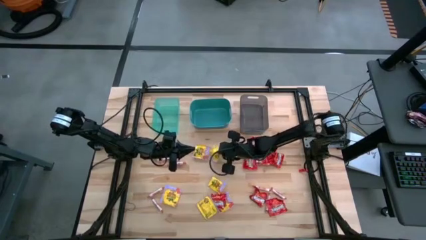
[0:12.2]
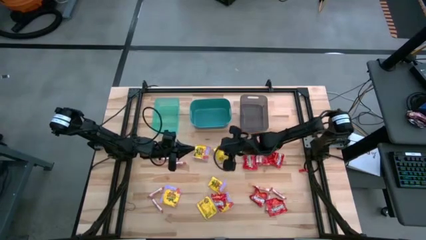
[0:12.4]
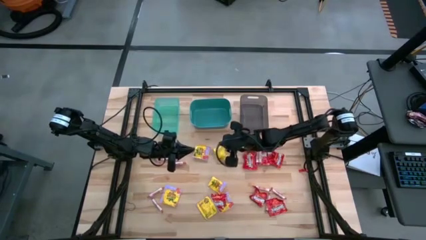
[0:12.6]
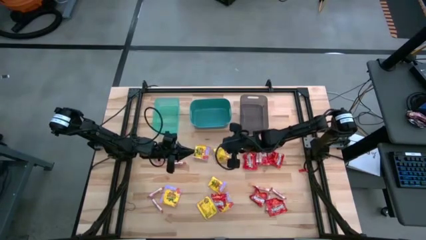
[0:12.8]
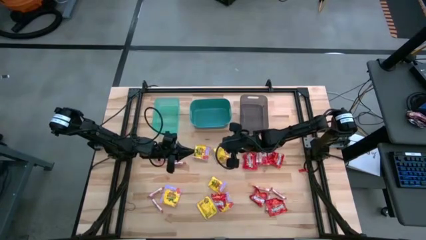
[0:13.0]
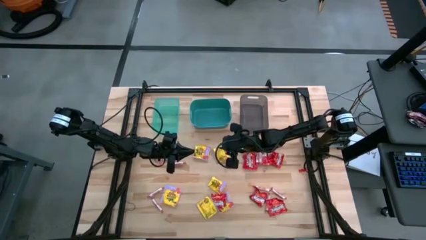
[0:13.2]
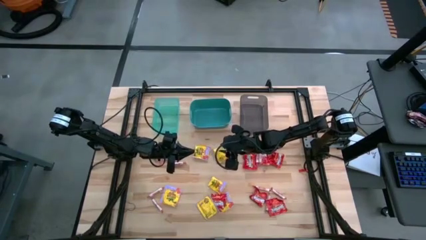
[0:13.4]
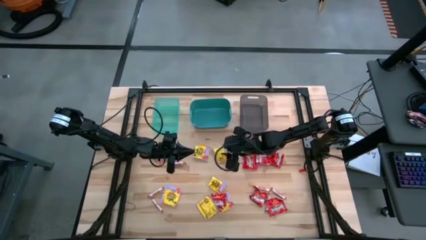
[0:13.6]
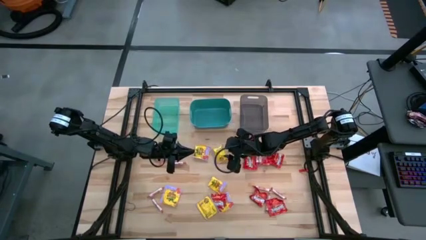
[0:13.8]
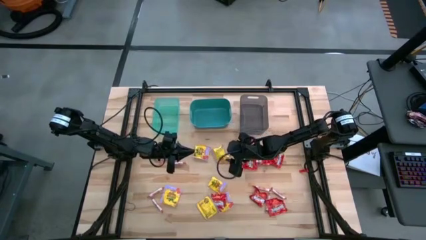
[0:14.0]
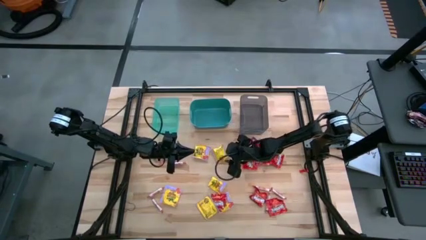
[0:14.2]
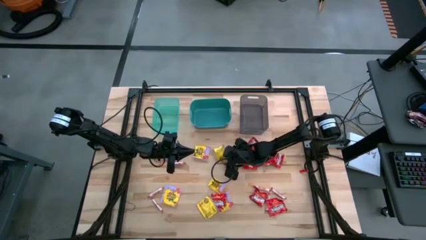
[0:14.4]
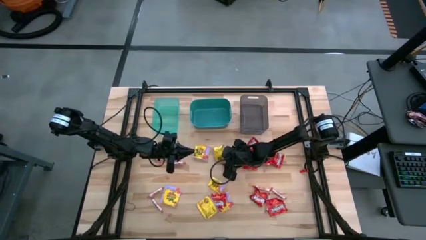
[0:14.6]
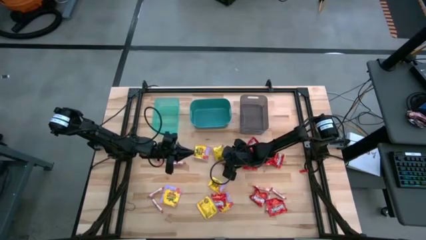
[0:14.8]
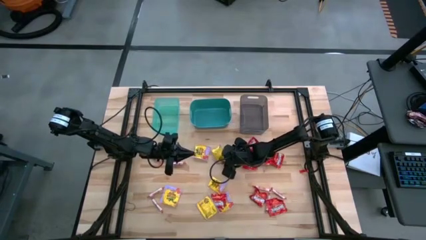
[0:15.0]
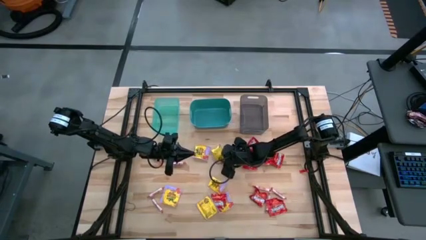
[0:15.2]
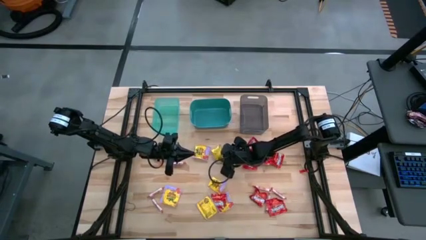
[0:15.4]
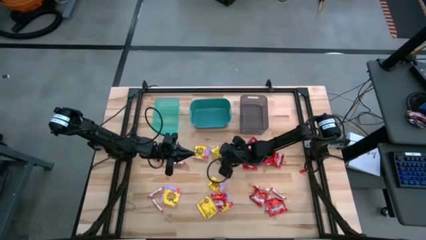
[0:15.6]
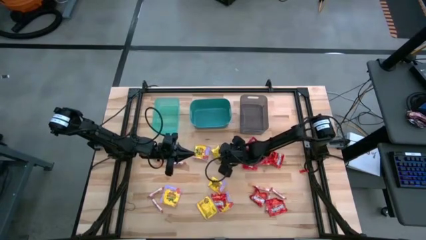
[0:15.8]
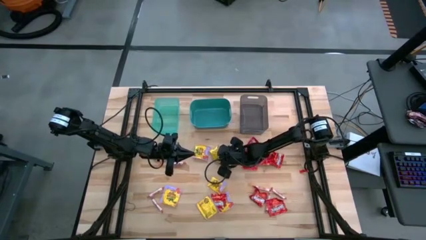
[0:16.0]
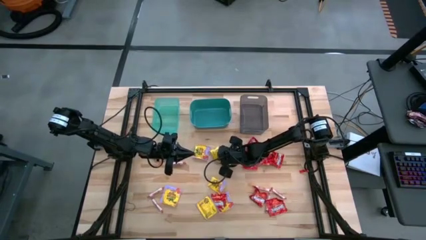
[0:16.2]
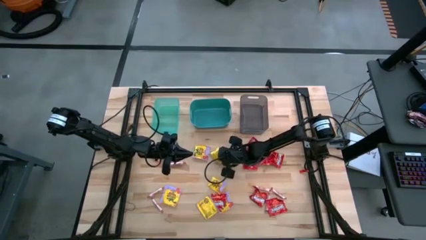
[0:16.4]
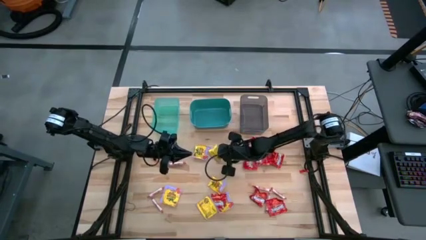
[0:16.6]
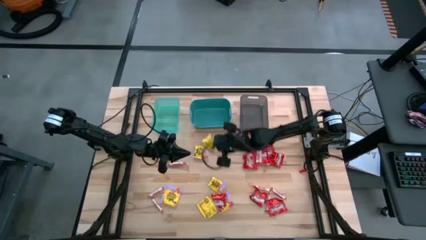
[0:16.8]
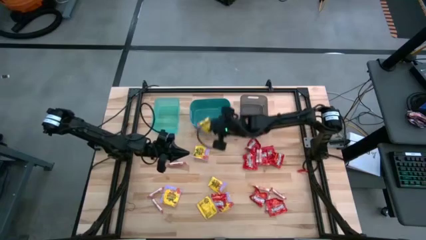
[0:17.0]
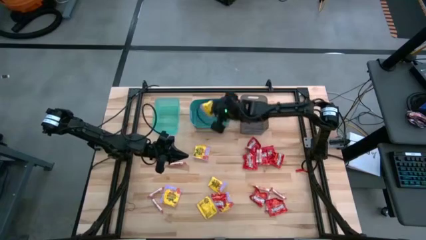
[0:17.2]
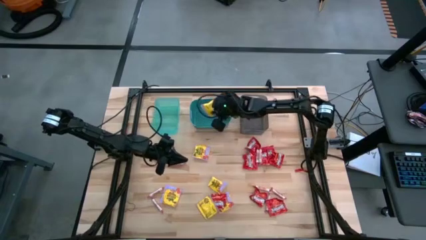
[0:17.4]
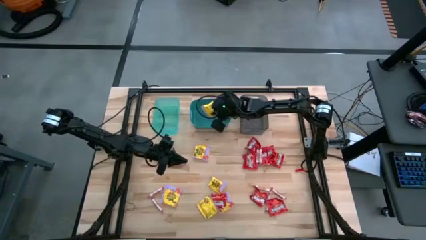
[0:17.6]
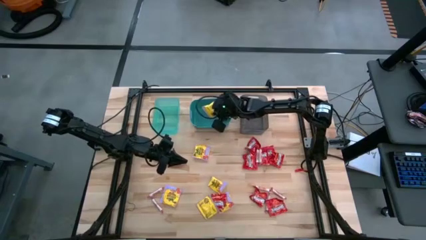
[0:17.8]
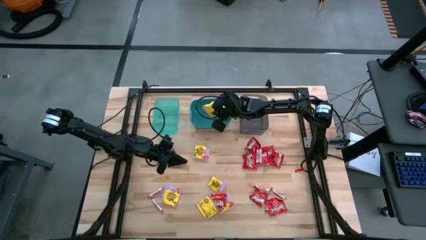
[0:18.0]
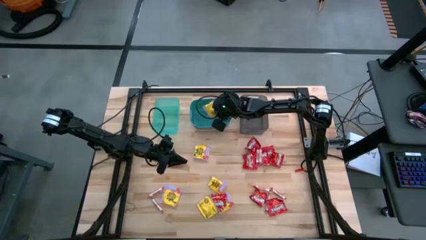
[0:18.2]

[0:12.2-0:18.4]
Task: Sort candy
Put the yellow candy into the green bin

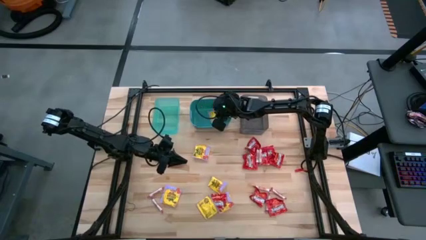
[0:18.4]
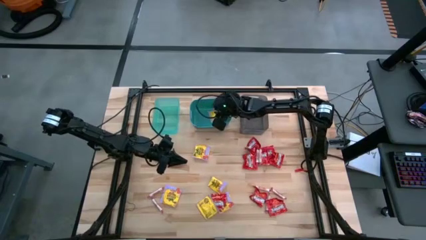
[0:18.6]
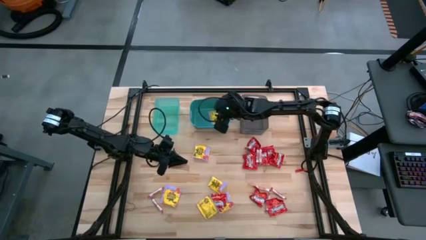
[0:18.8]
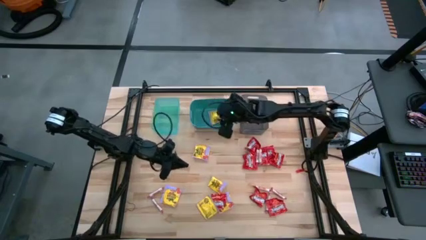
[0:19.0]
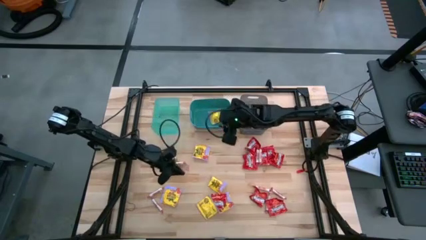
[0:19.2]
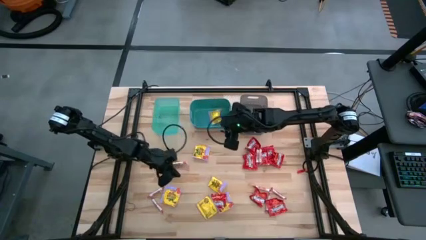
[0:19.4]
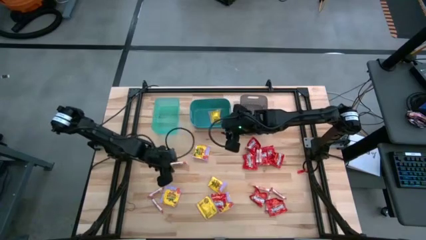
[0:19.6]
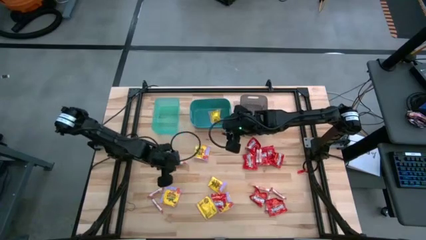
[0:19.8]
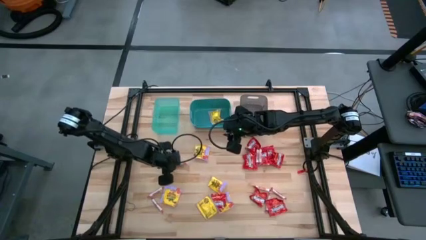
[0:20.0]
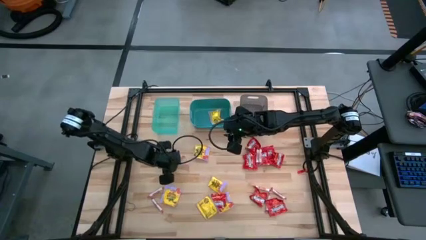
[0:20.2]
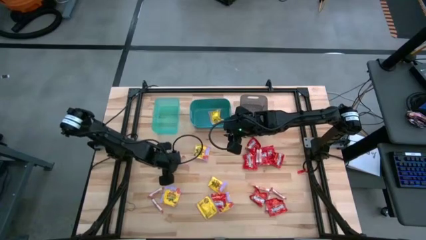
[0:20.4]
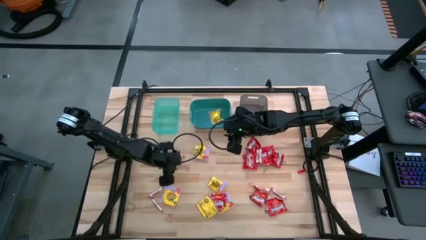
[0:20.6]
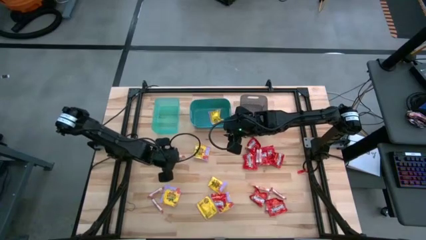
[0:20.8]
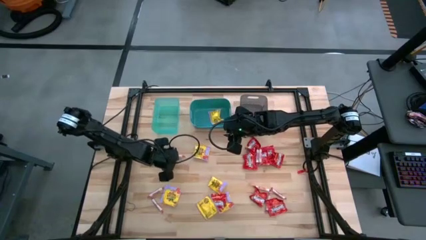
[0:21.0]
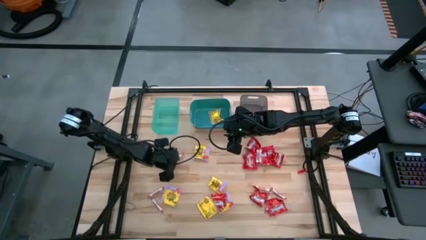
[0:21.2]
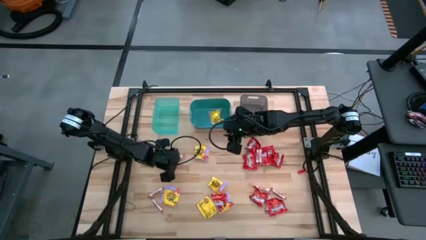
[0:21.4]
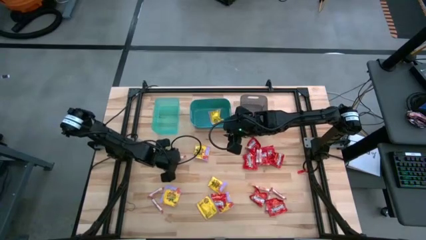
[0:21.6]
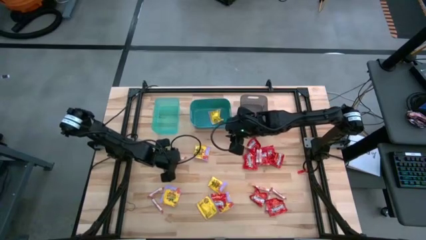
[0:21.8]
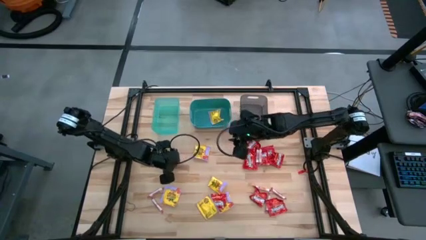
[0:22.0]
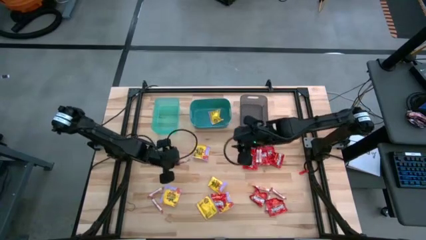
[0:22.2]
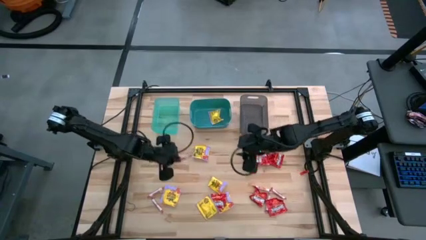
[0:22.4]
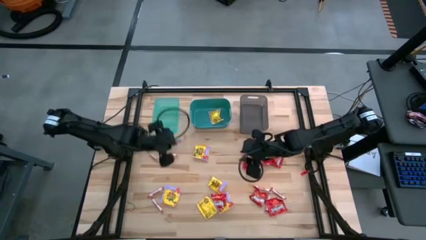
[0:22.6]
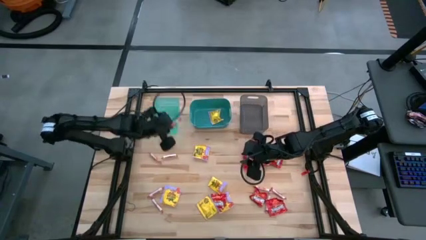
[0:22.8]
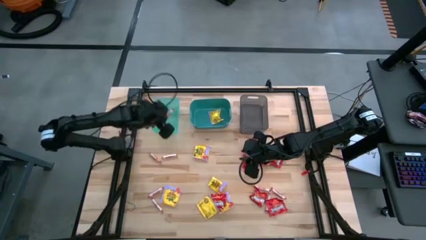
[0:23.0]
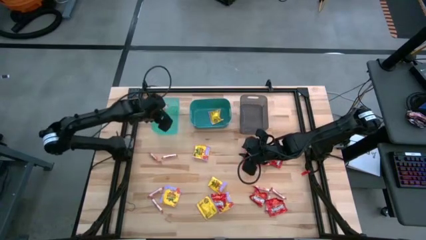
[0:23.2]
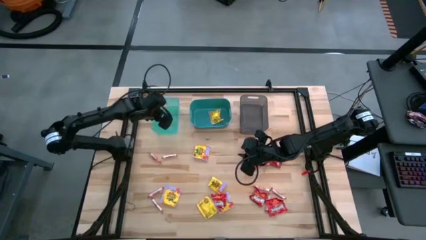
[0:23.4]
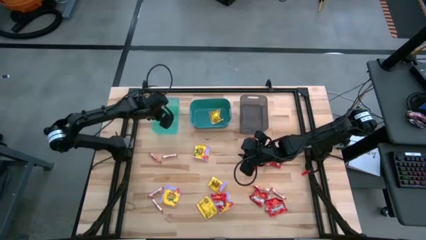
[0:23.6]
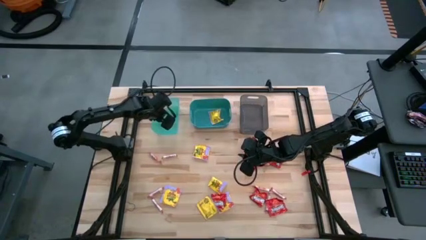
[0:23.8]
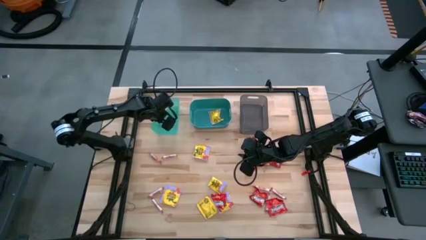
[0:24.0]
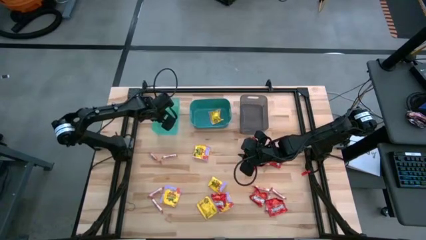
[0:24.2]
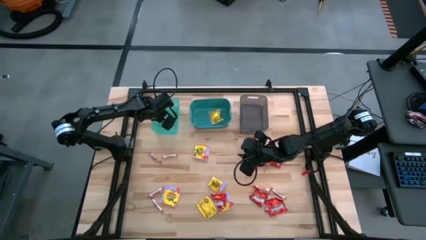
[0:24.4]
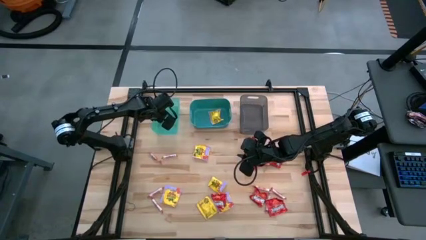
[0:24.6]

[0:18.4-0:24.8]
Put the white candy into the blue bin

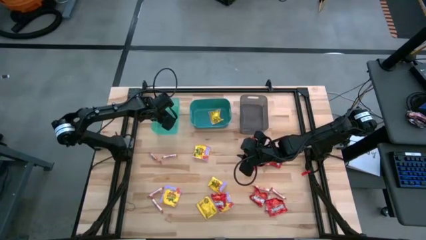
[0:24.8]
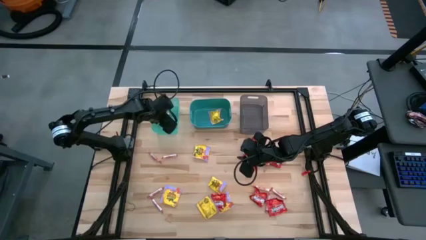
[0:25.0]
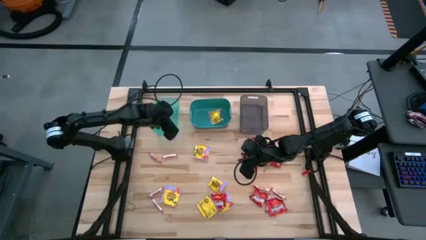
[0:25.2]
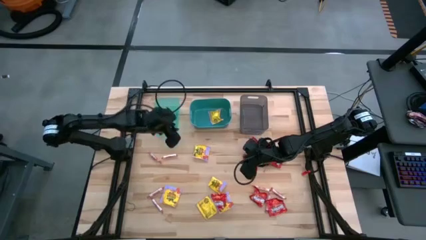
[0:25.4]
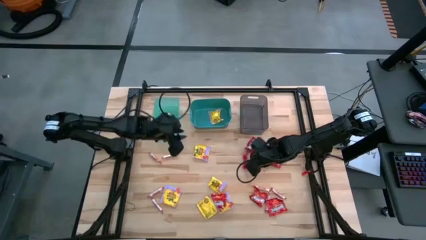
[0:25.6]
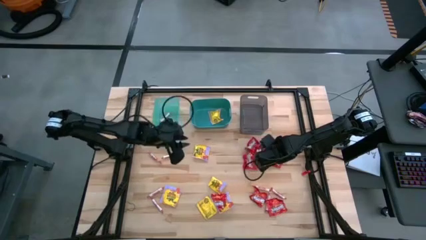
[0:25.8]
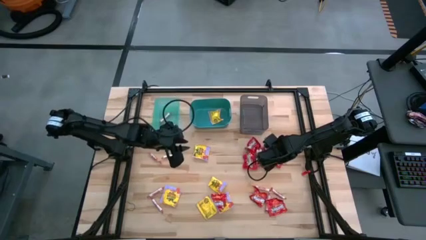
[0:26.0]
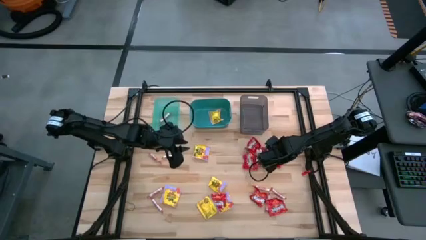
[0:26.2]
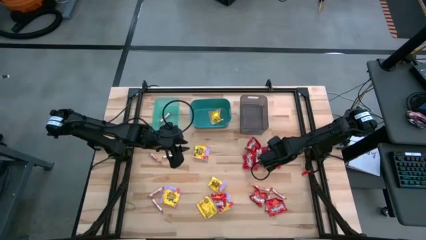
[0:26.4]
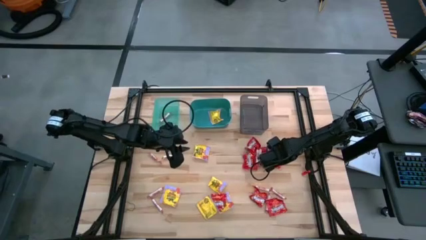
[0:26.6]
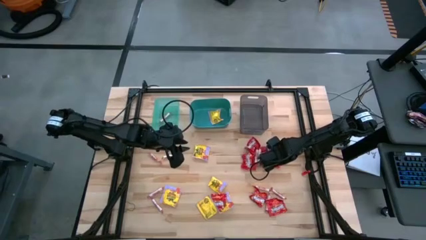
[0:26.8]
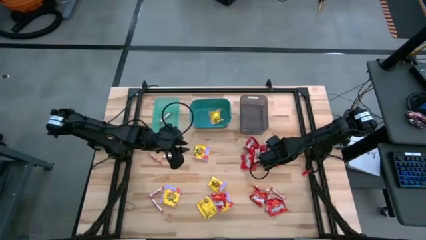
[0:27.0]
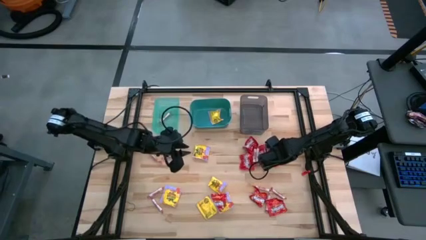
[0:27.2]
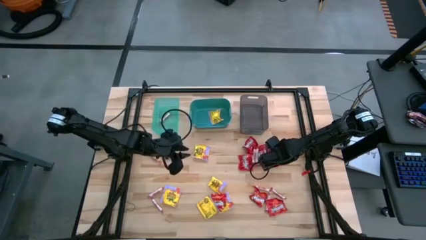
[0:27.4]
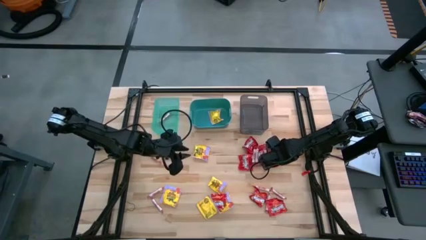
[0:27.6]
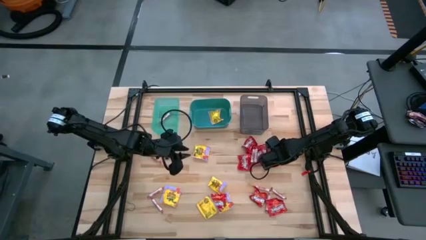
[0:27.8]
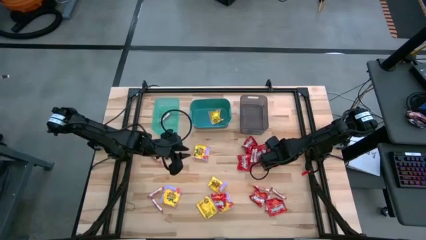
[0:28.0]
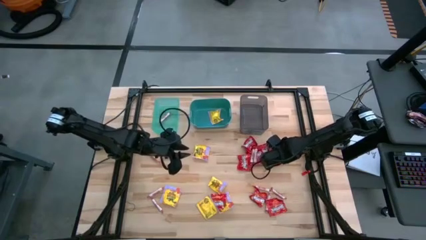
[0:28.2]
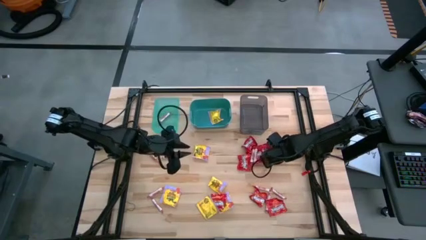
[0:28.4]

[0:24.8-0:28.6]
Put the red candy into the black bin
